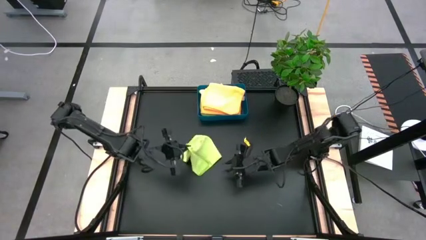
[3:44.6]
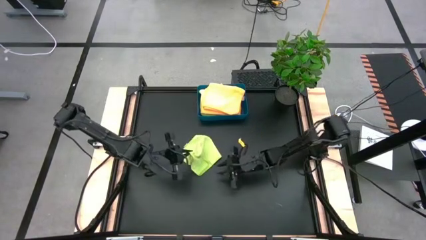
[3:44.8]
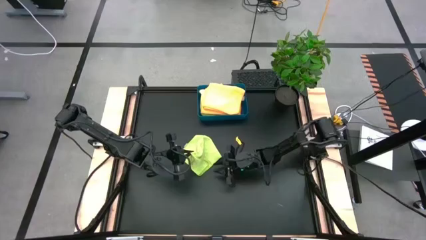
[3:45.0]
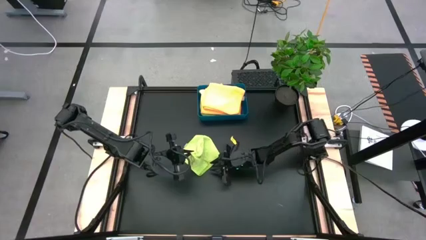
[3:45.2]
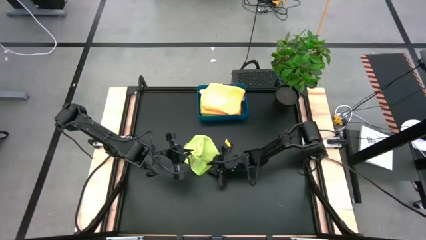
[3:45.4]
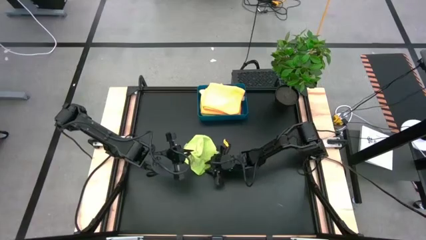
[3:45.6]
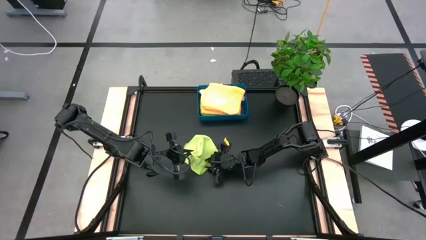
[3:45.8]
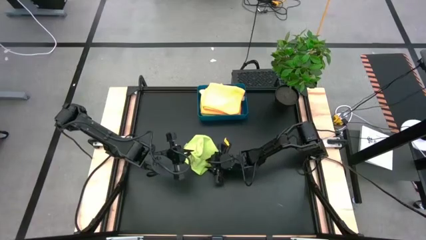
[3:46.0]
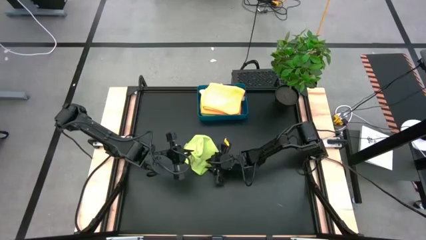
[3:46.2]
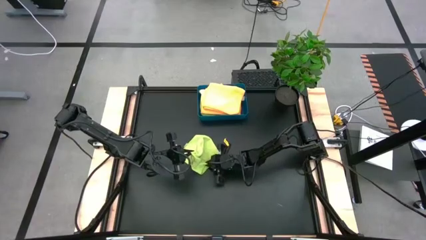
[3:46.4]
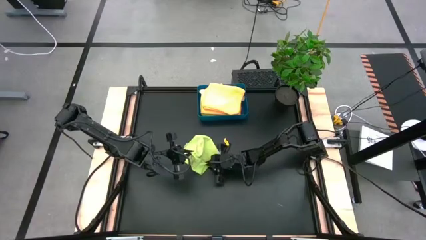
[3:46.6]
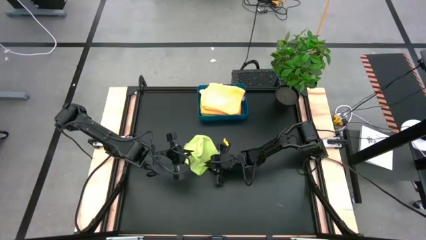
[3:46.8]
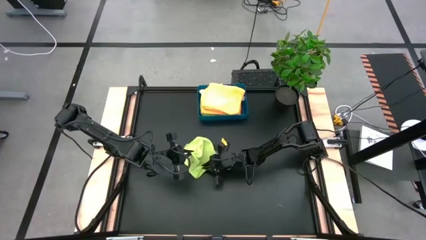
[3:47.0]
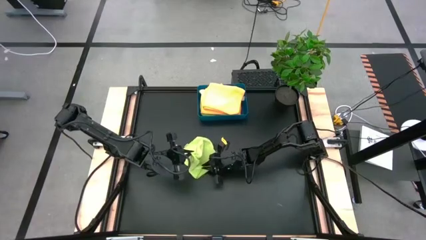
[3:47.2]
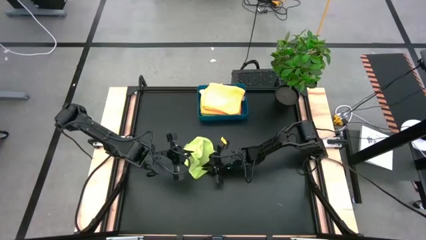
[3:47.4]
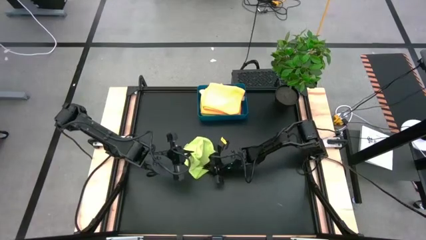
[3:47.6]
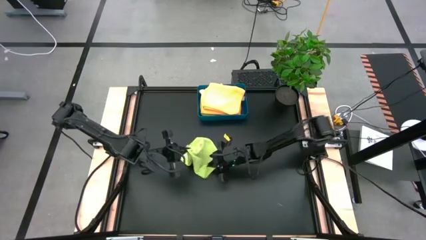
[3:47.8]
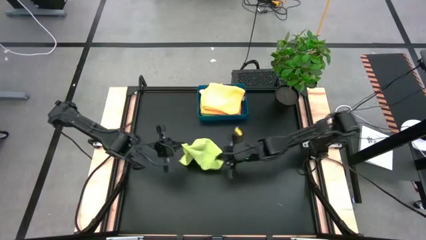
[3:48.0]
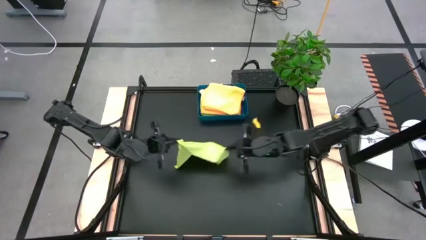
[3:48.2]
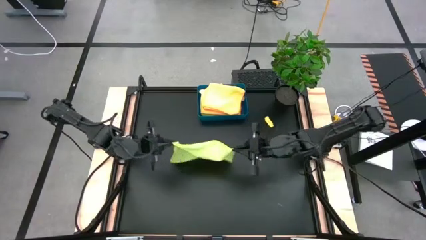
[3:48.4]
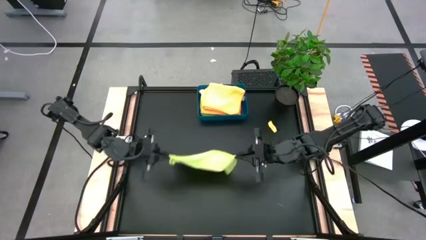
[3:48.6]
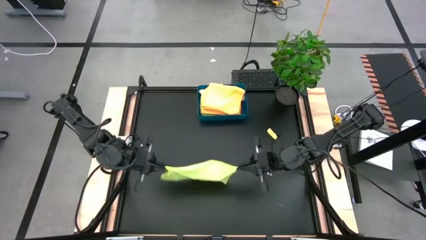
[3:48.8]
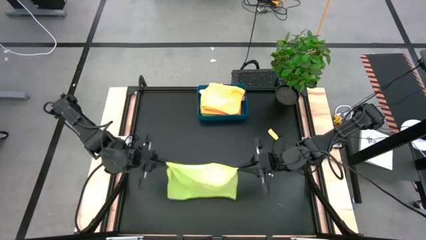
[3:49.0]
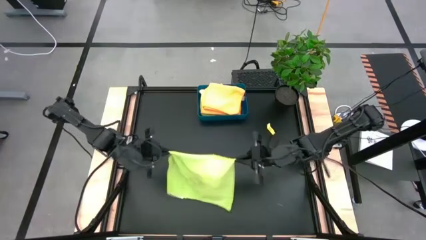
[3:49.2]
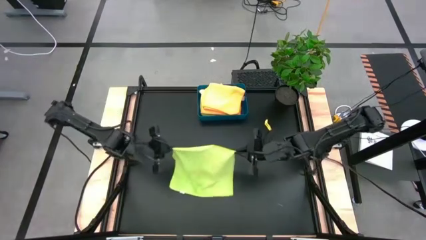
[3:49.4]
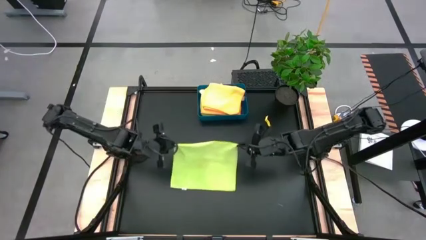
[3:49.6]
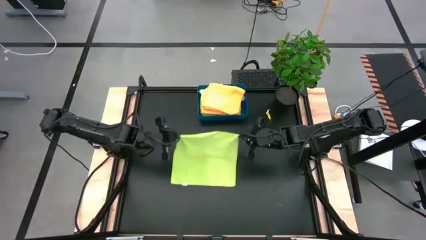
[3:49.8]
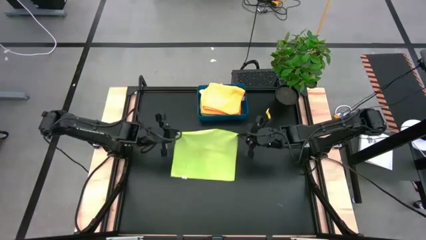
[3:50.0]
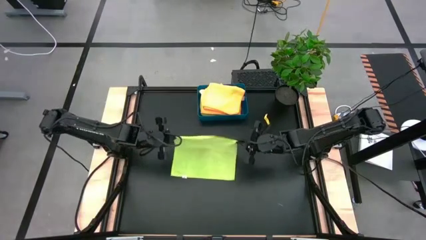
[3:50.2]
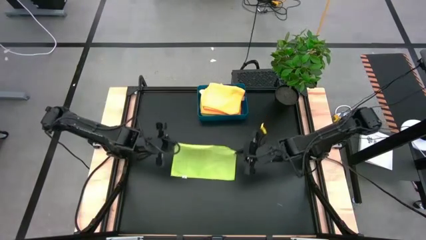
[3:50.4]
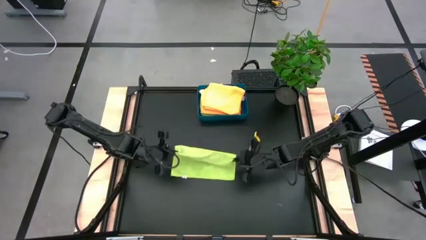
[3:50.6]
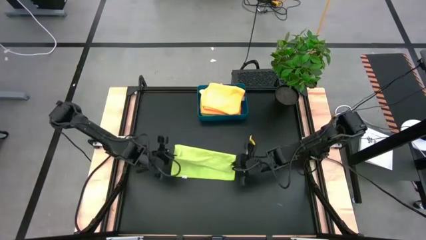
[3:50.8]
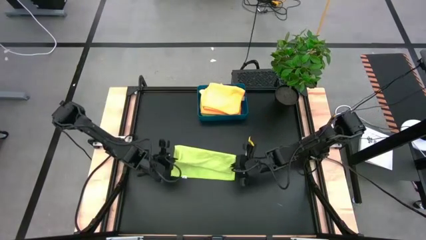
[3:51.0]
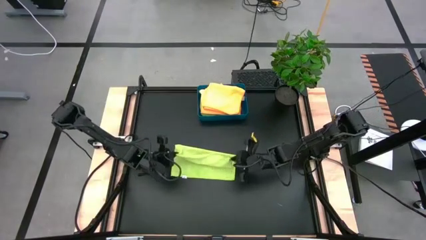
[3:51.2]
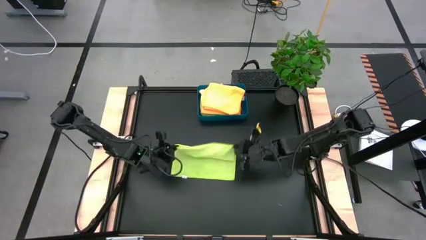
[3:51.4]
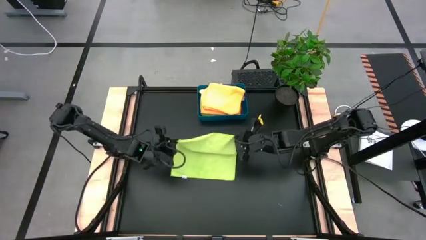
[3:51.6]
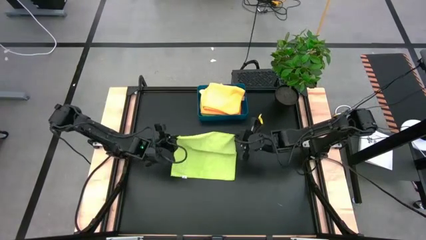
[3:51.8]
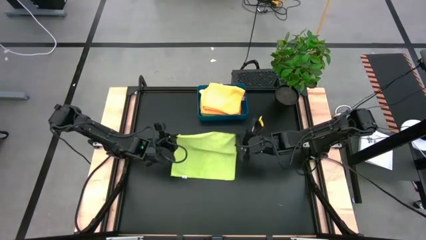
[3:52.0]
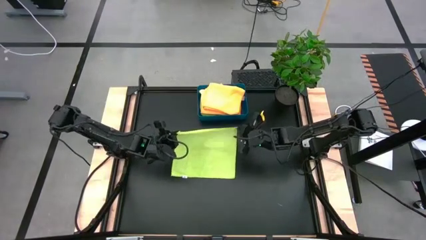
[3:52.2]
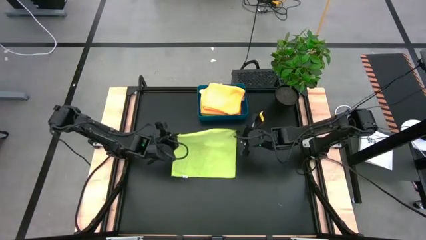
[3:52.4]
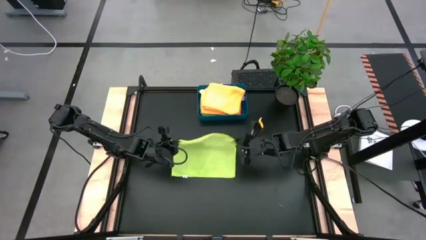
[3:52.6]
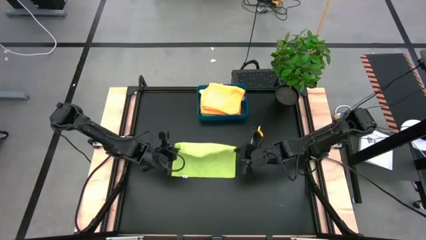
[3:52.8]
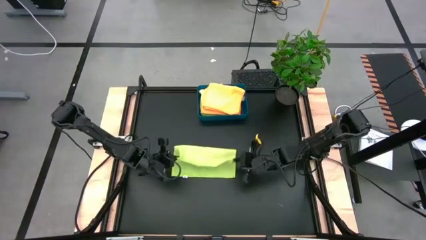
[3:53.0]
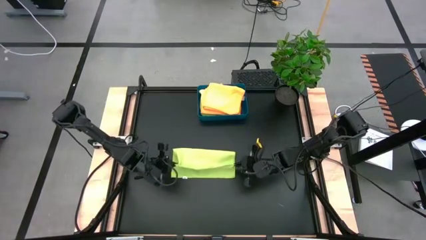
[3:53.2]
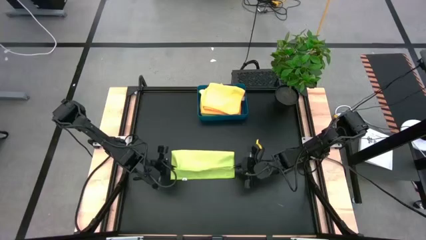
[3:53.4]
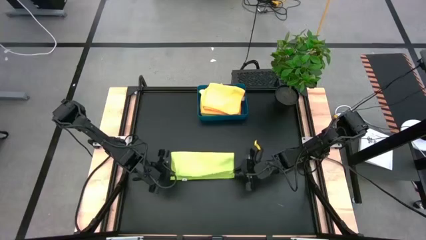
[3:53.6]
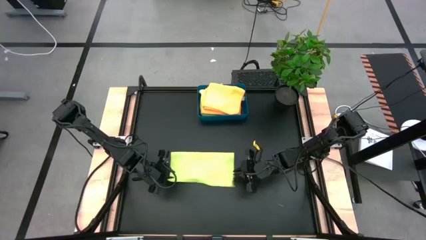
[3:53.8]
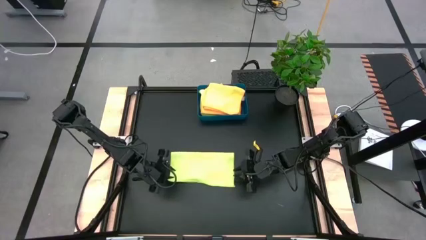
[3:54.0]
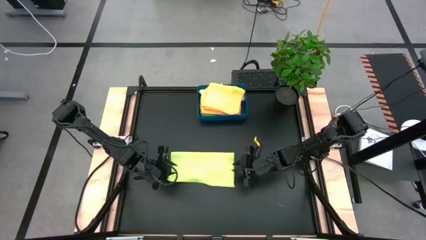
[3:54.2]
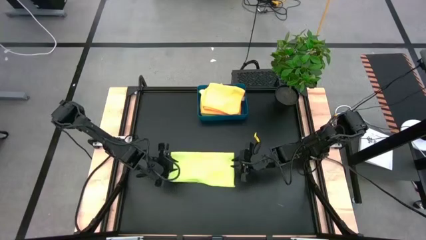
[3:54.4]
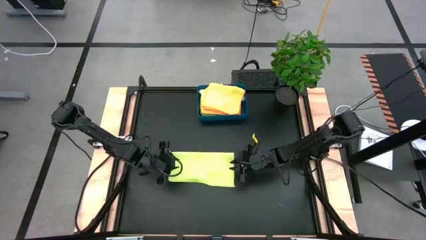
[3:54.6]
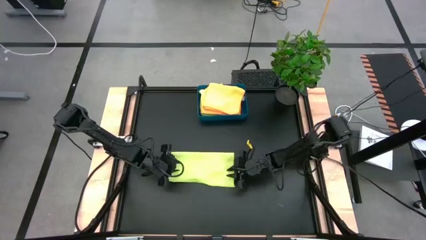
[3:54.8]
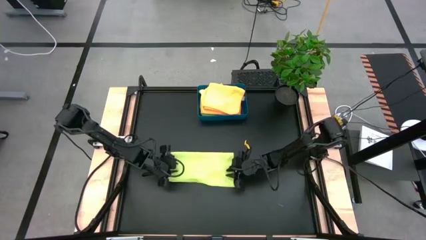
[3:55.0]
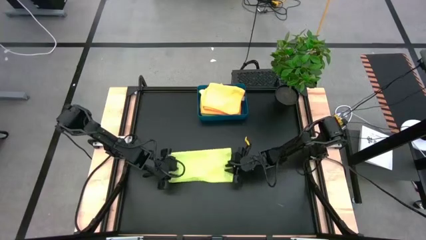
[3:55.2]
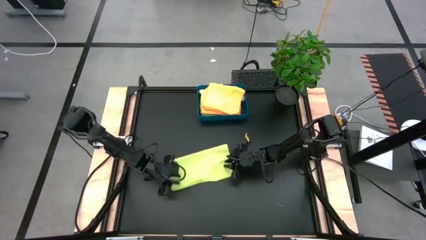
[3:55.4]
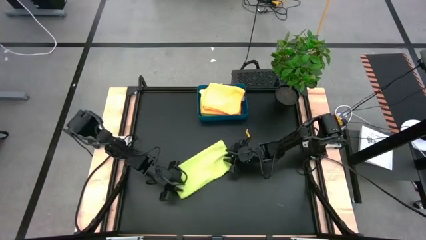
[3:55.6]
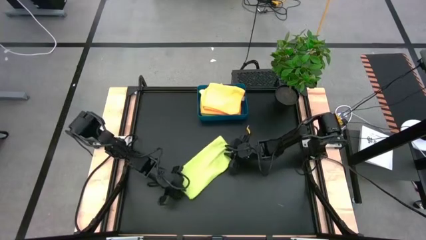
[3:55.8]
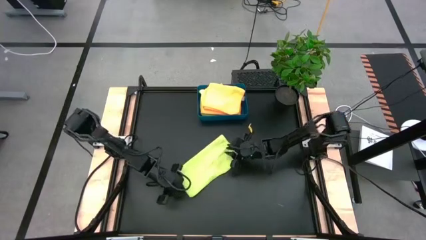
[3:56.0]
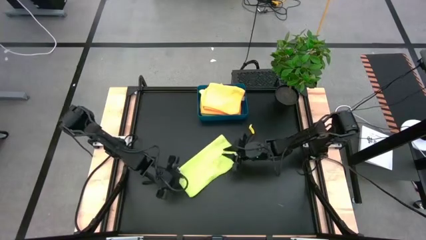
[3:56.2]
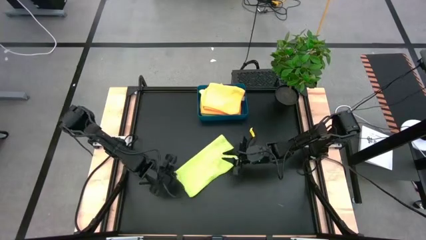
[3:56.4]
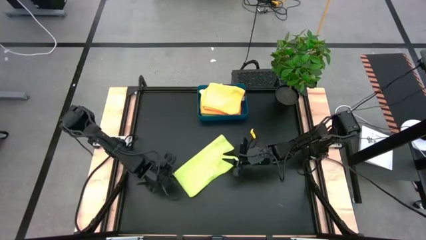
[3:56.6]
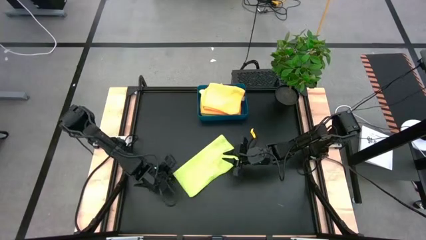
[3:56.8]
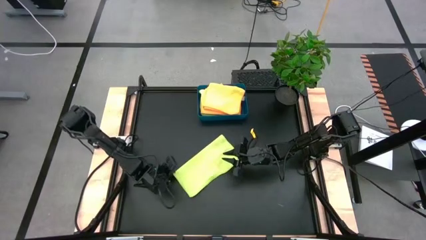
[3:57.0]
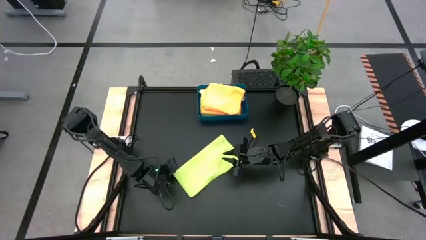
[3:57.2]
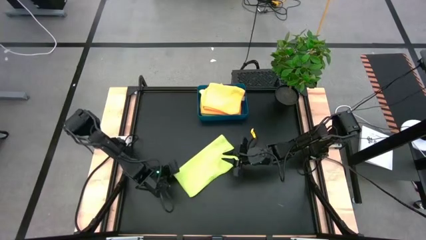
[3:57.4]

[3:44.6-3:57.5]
Task: Fold microfiber towels
Fold the green microfiber towel
